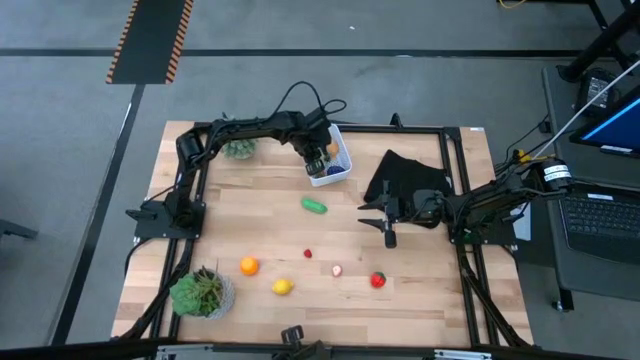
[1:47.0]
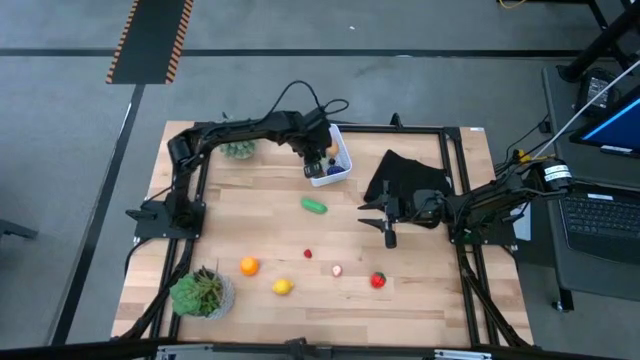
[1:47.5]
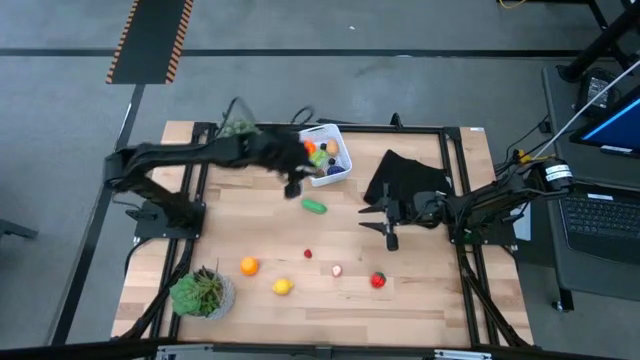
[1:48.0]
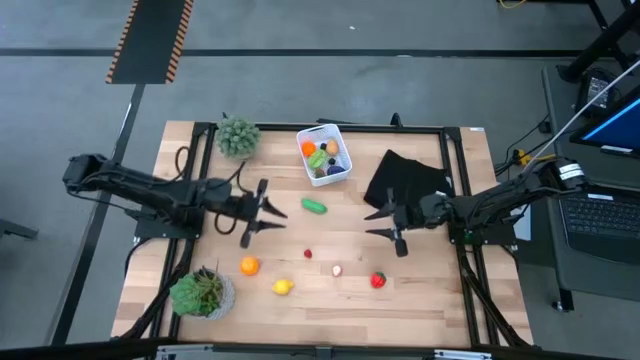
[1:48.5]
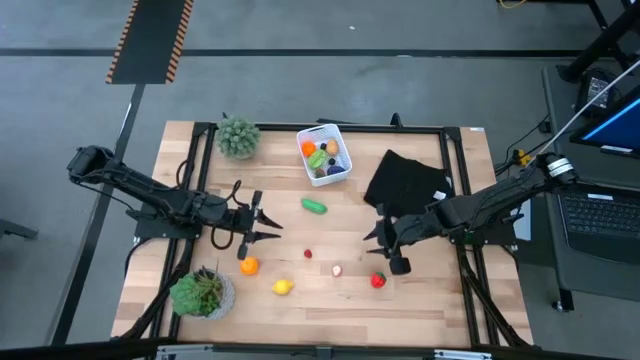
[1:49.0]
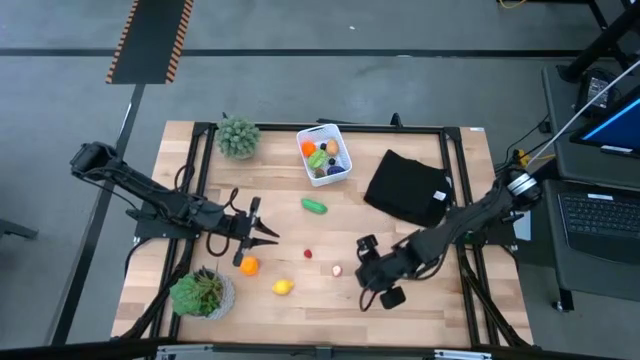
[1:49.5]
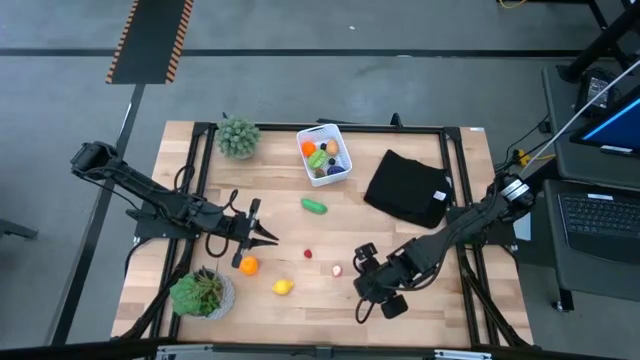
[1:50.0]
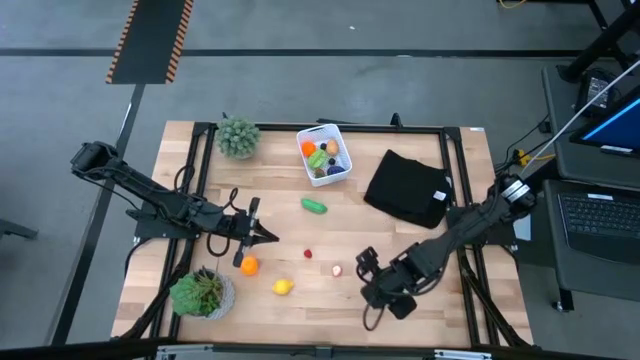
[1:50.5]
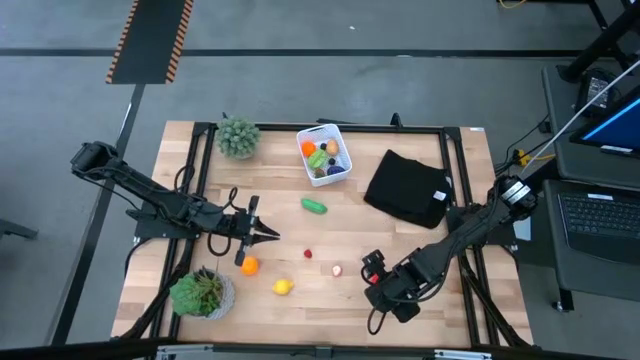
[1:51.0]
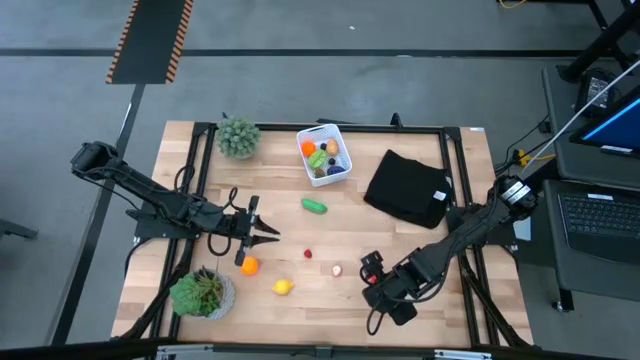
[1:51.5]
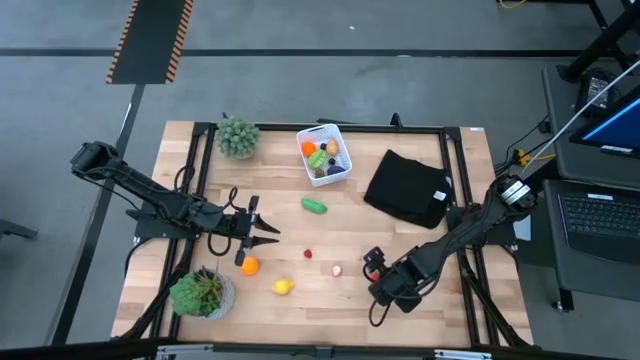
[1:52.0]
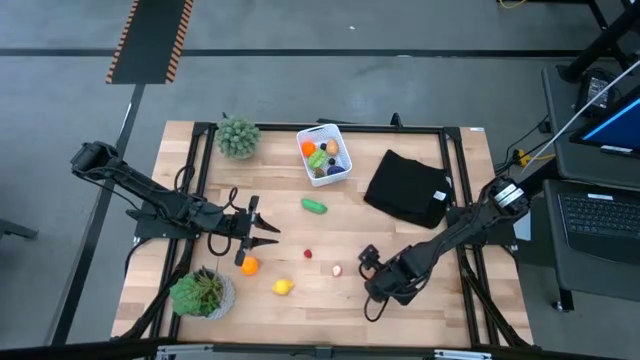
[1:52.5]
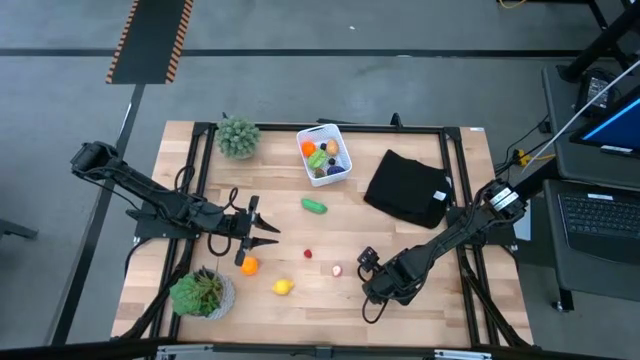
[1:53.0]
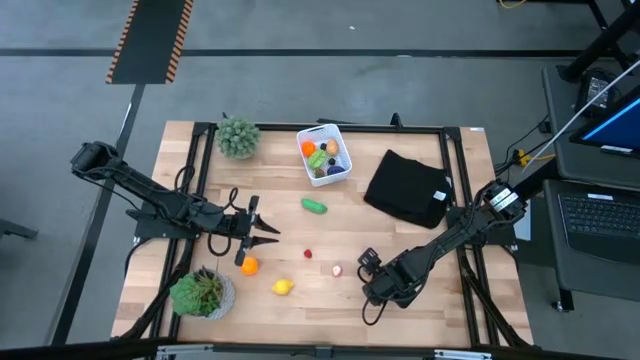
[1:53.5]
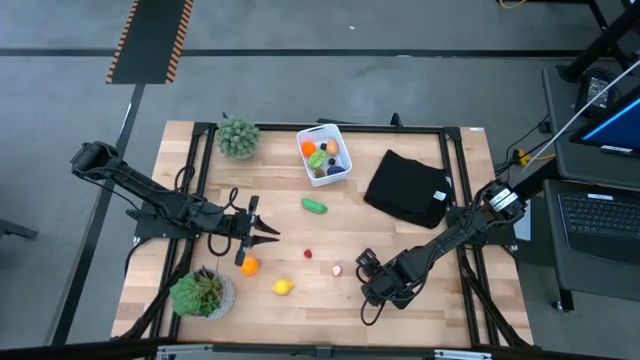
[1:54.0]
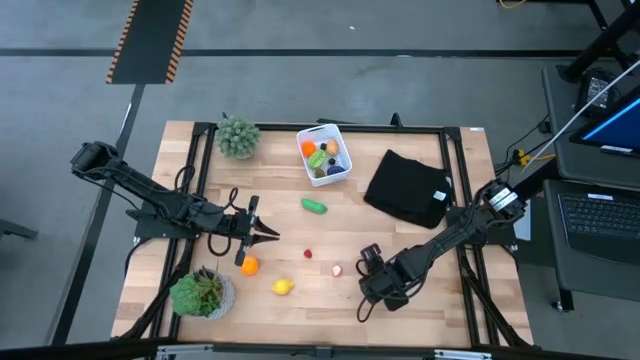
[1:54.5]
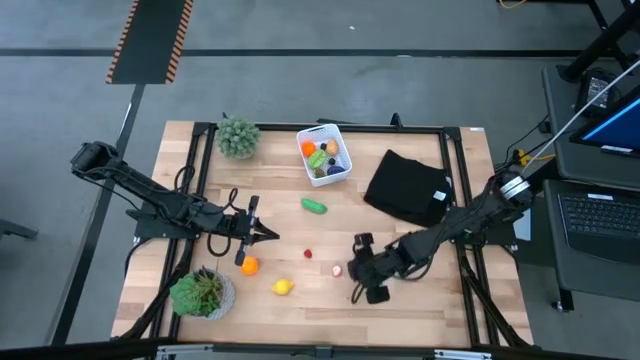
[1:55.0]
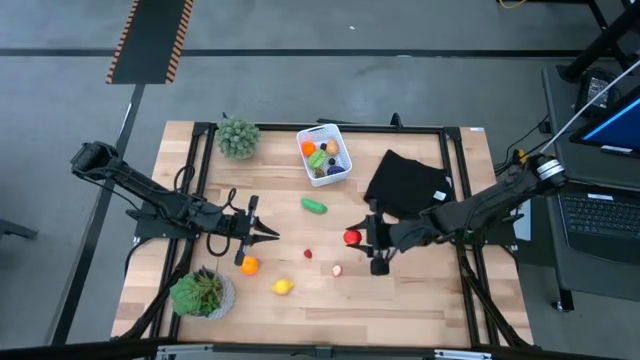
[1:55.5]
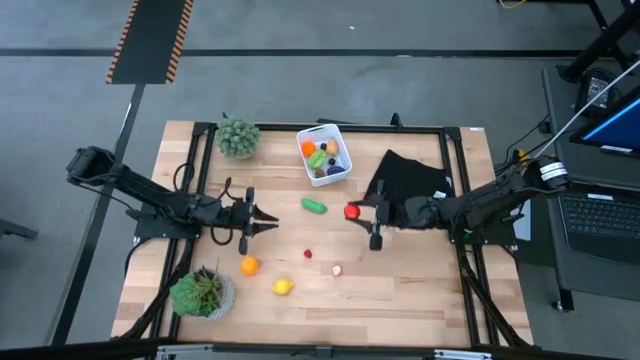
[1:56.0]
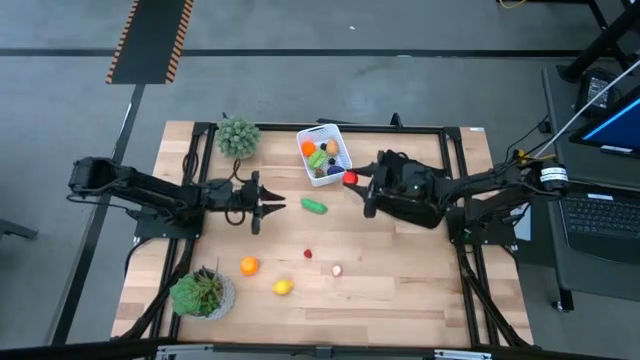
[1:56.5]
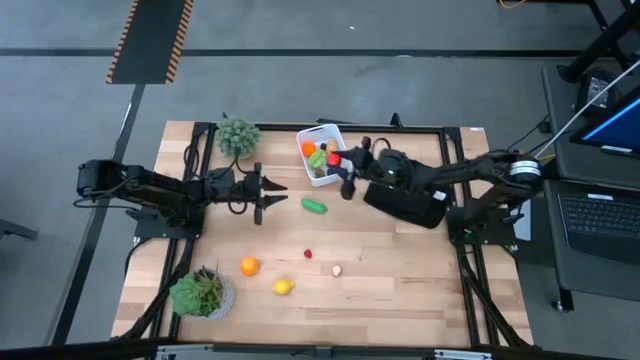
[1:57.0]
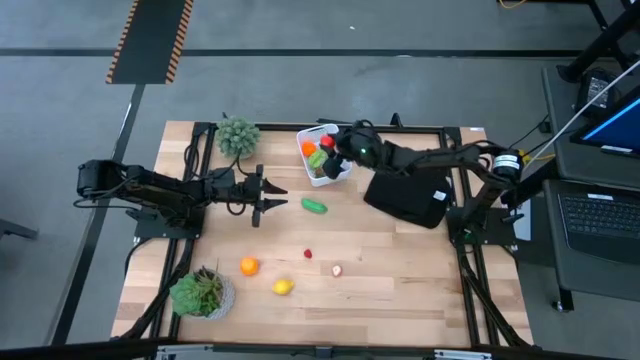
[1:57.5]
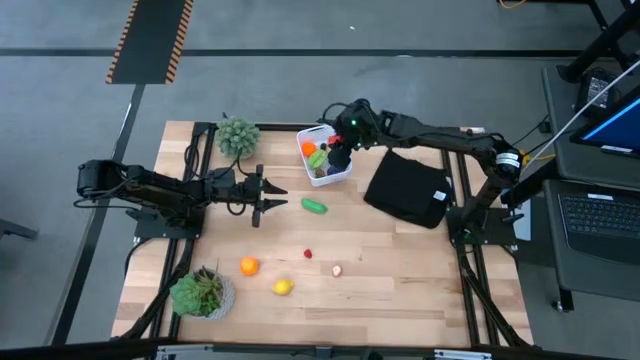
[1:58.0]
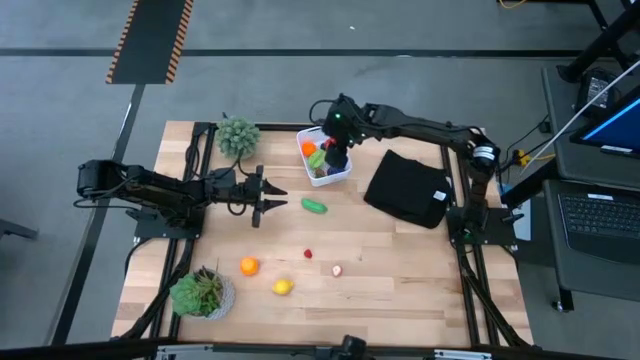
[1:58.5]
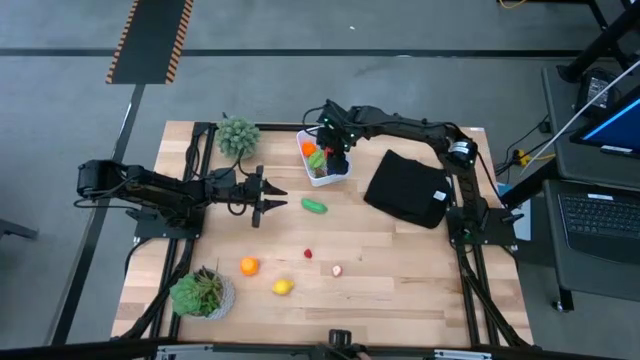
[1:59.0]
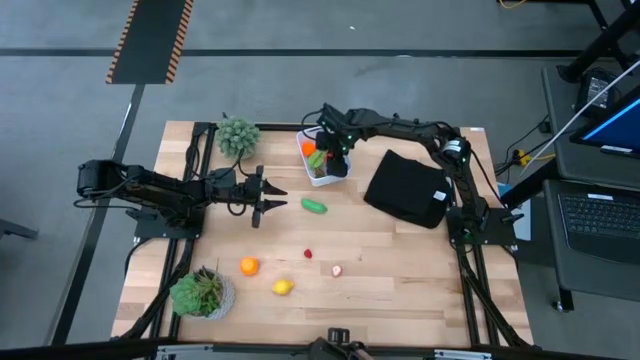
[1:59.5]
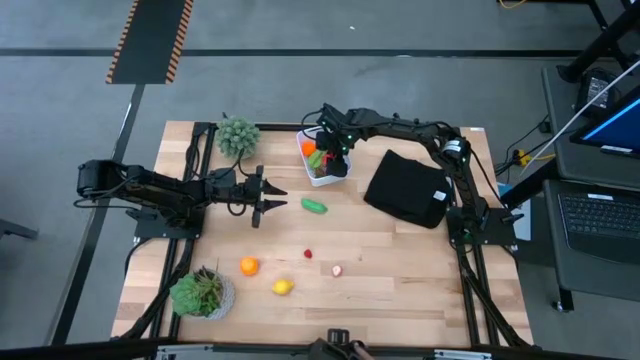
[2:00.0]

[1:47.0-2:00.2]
Task: Pick and placing Produce into tupperware
Put the strawberry into the basket

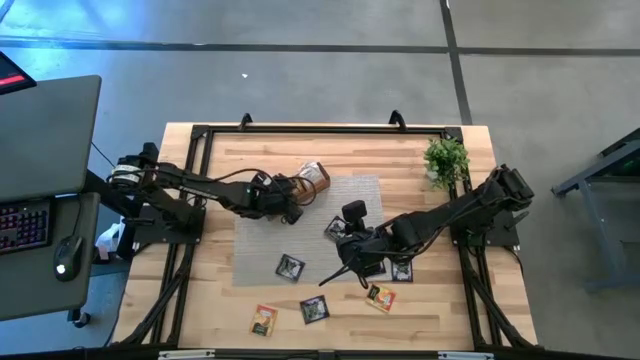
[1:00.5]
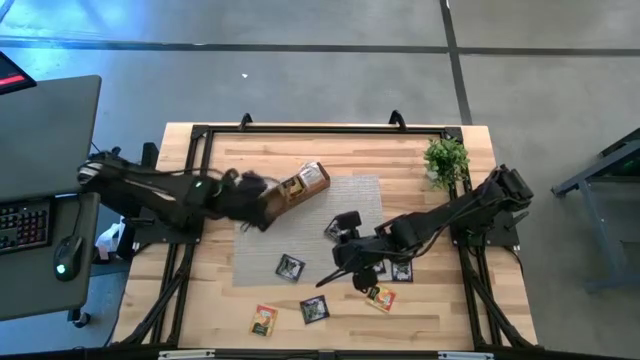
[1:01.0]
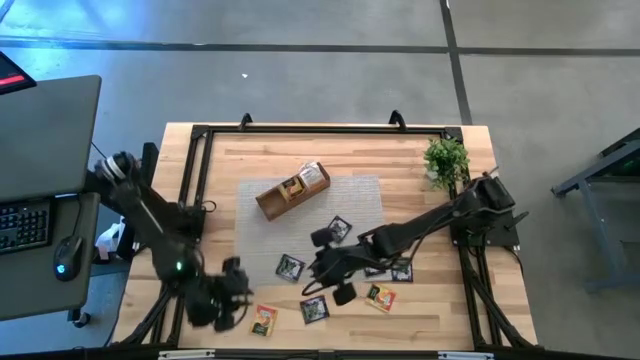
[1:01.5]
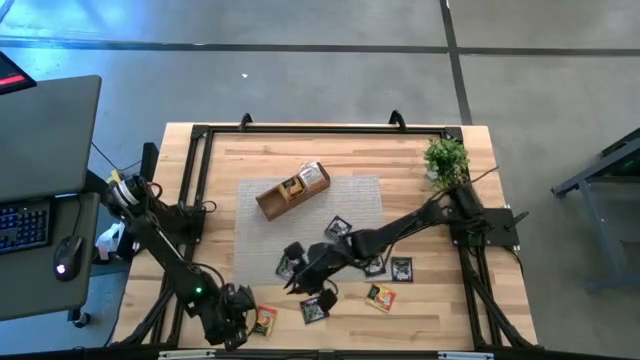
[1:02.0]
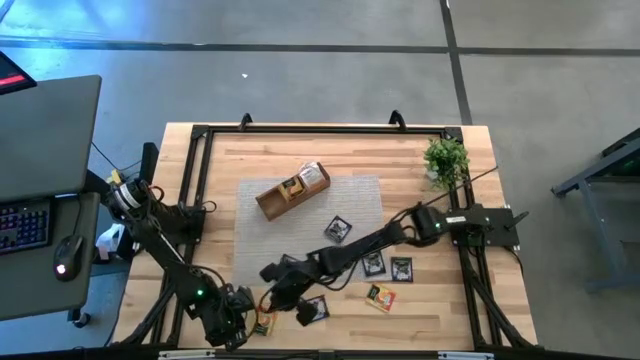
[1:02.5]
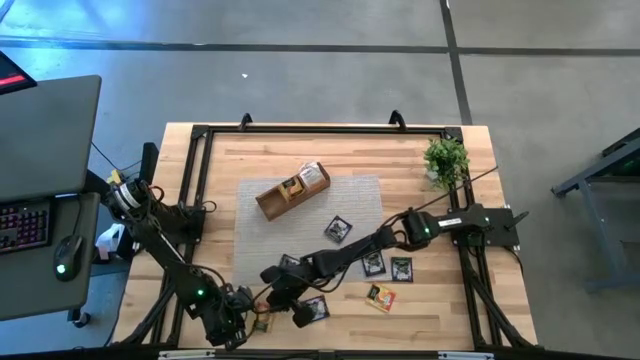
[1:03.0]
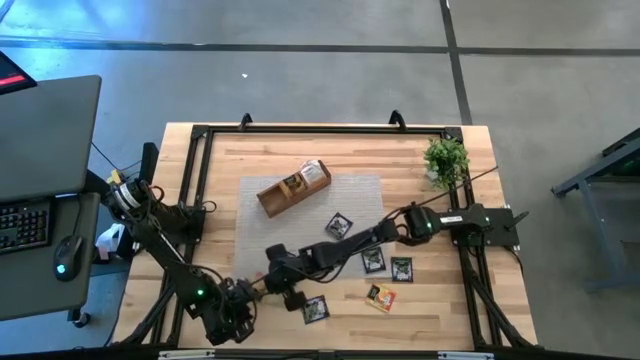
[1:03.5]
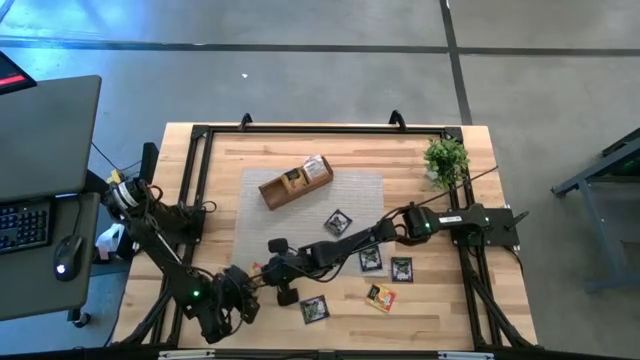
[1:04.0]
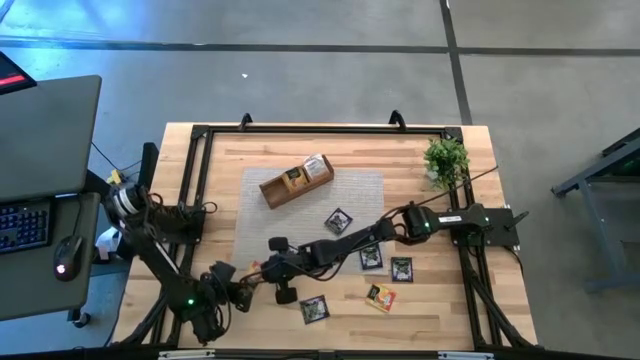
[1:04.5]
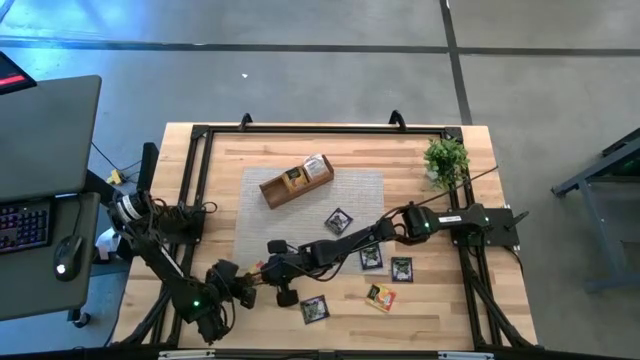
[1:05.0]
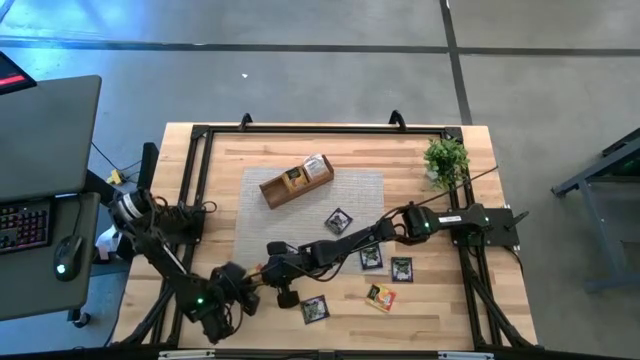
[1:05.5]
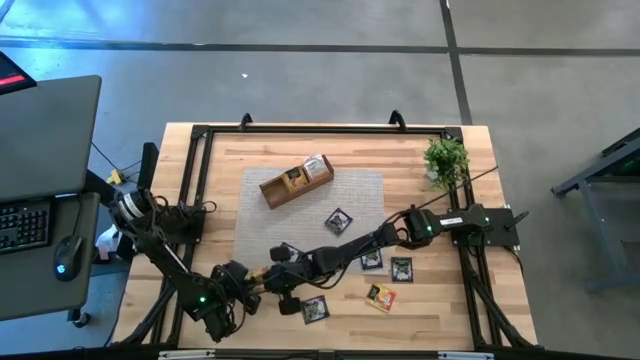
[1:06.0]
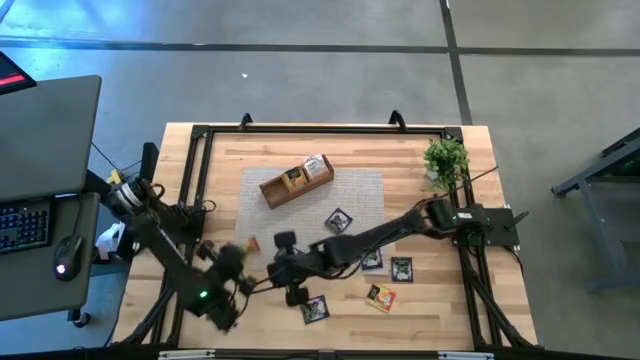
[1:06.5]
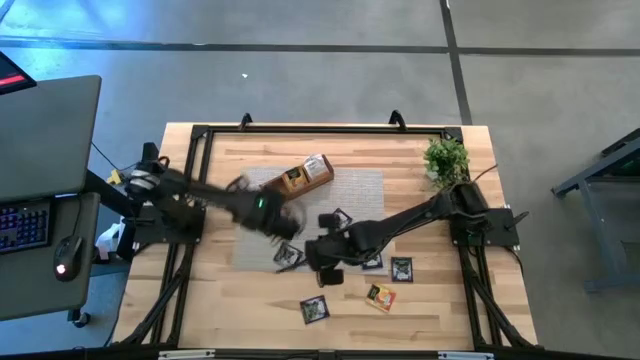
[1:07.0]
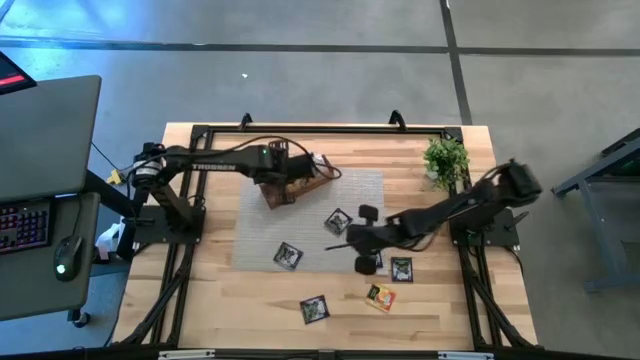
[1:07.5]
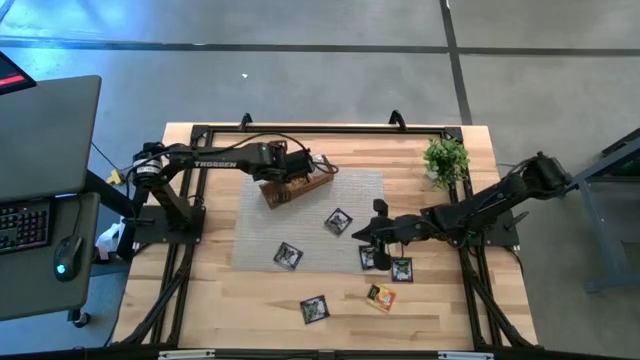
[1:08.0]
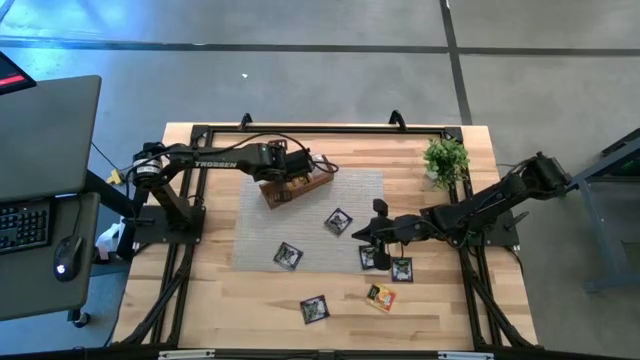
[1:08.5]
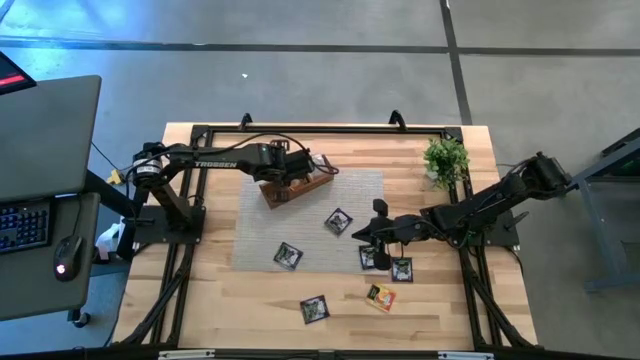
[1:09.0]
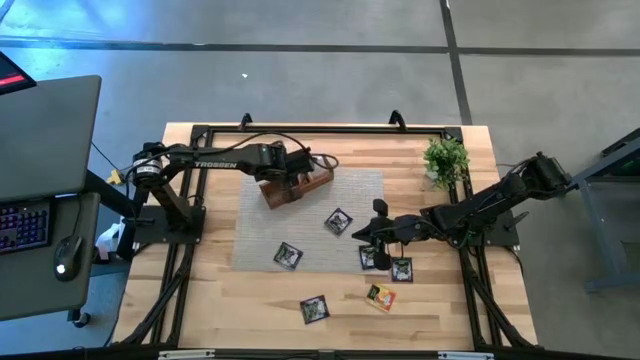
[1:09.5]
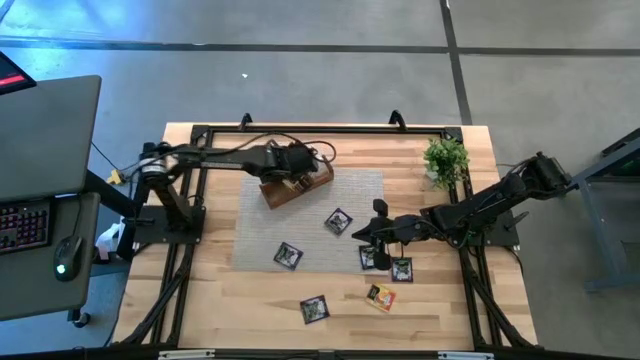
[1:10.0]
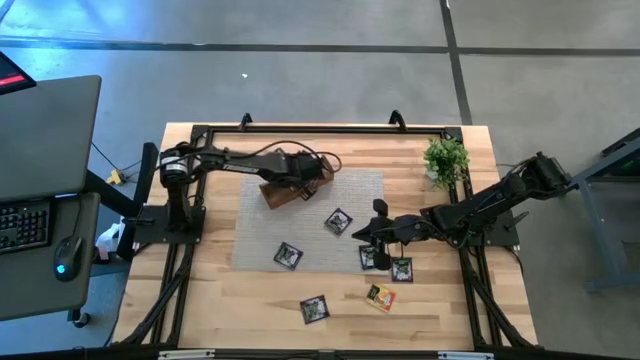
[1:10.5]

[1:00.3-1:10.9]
Task: Pick & Place Tea
Put the yellow tea bag into the middle section of the wooden organizer
